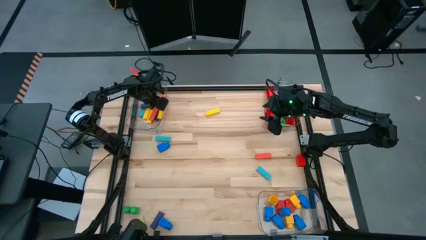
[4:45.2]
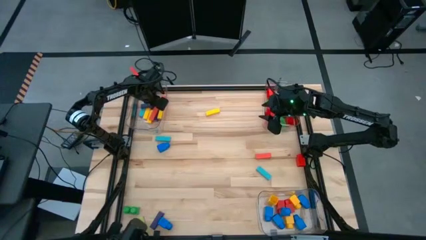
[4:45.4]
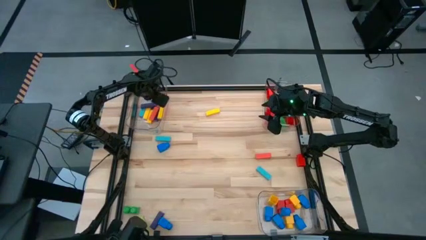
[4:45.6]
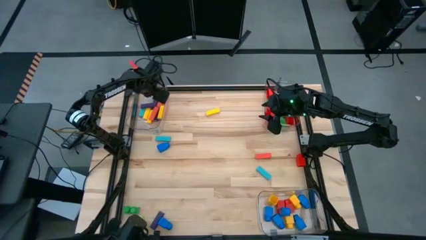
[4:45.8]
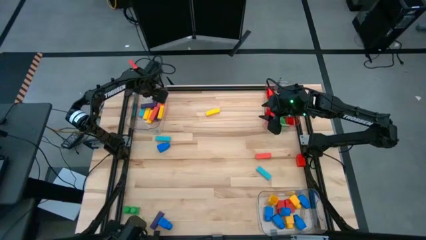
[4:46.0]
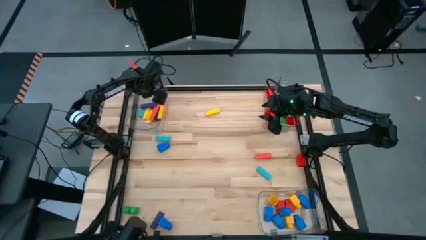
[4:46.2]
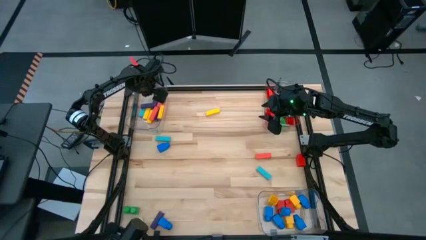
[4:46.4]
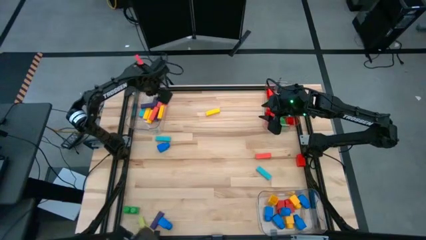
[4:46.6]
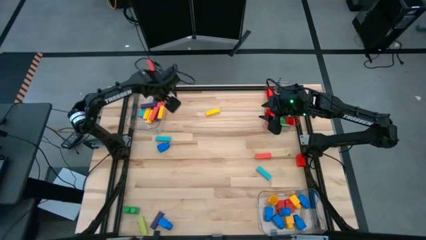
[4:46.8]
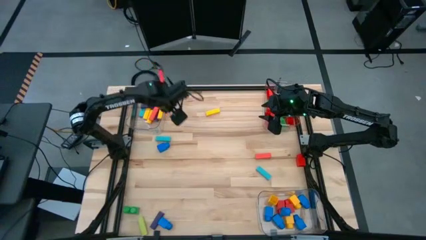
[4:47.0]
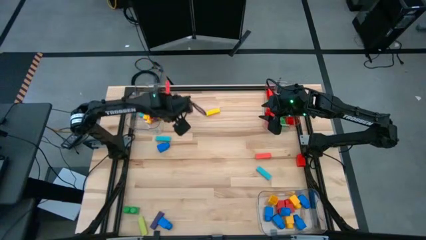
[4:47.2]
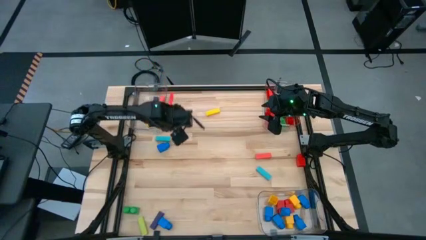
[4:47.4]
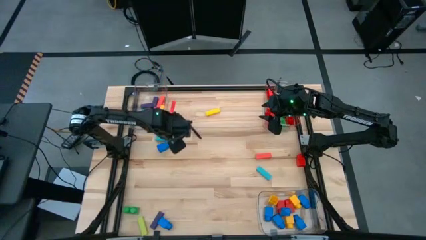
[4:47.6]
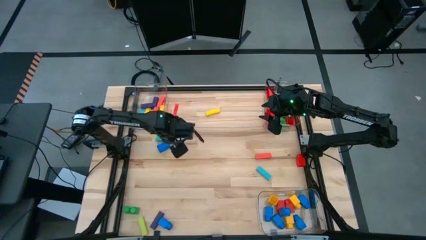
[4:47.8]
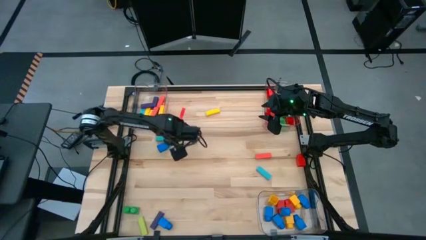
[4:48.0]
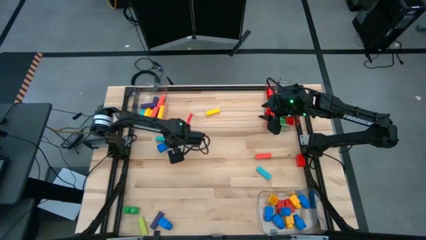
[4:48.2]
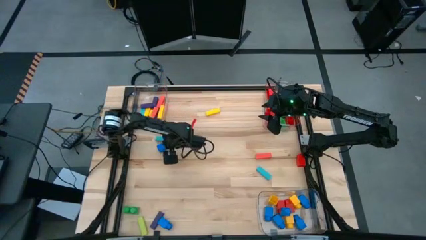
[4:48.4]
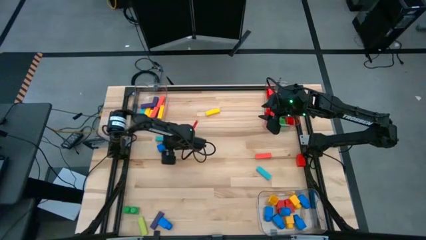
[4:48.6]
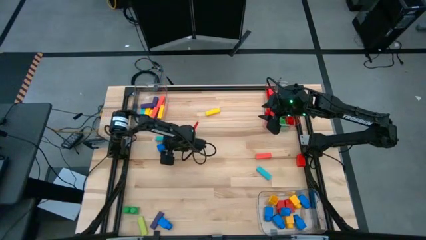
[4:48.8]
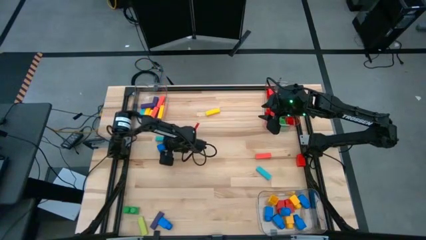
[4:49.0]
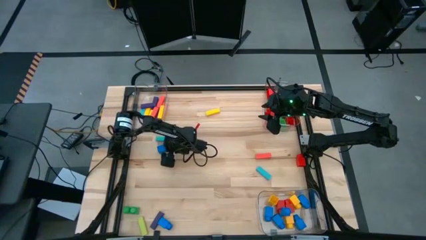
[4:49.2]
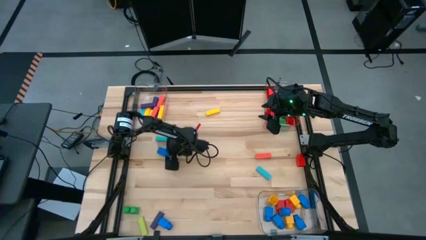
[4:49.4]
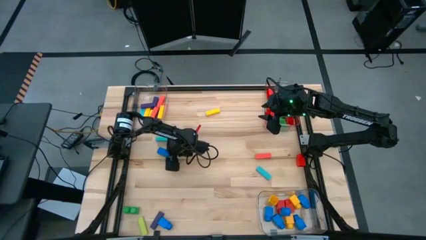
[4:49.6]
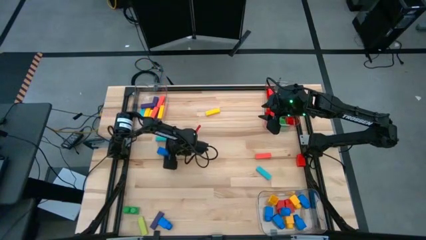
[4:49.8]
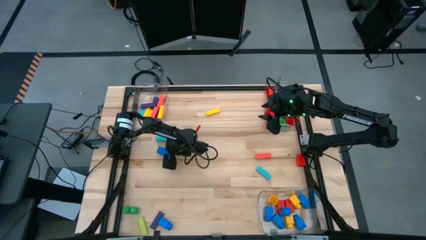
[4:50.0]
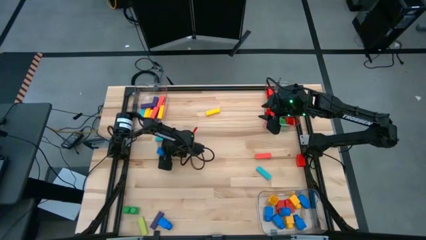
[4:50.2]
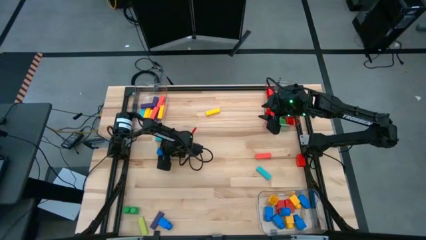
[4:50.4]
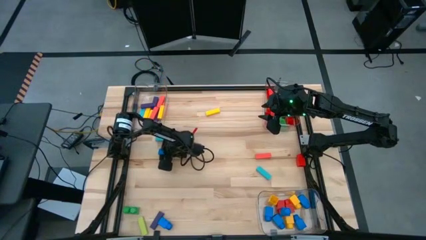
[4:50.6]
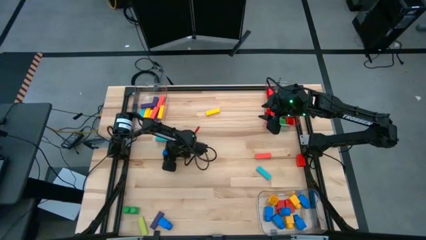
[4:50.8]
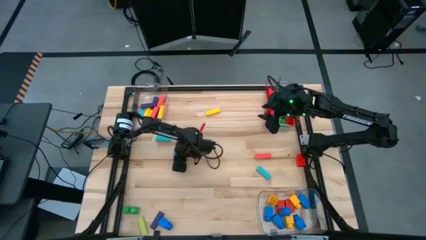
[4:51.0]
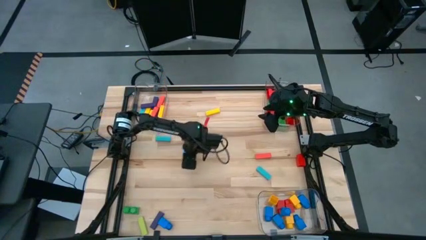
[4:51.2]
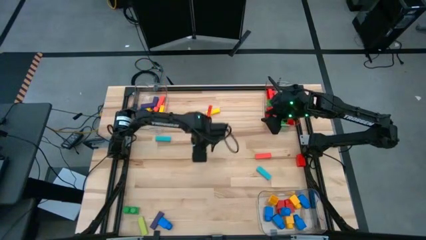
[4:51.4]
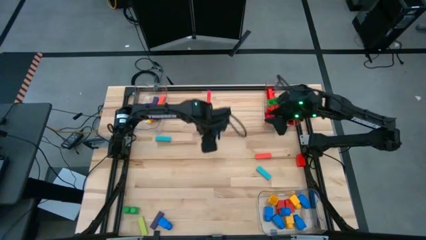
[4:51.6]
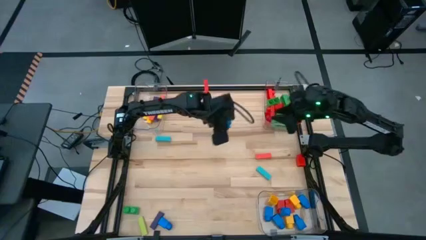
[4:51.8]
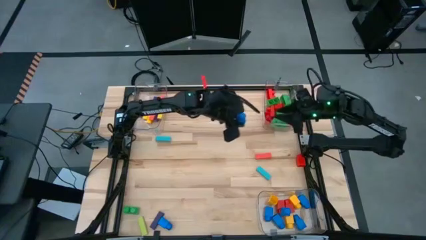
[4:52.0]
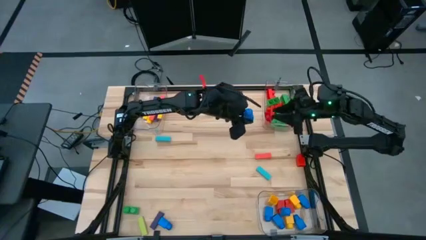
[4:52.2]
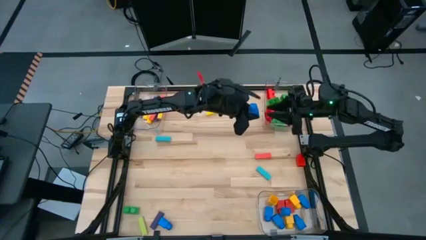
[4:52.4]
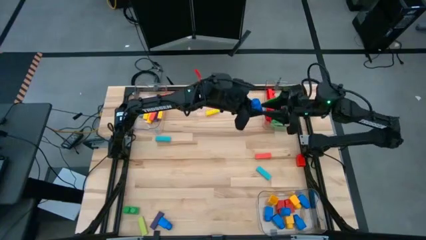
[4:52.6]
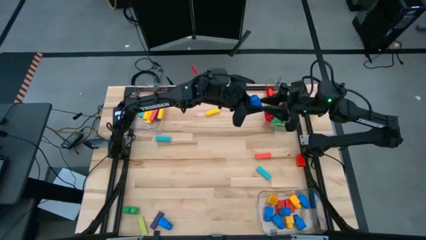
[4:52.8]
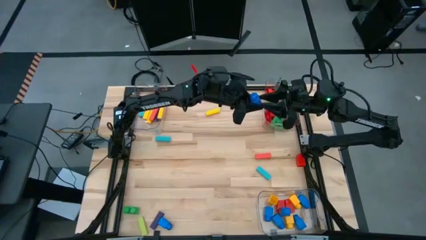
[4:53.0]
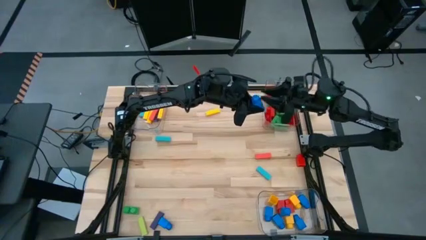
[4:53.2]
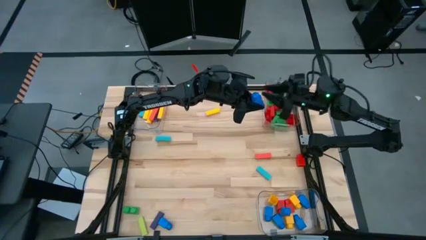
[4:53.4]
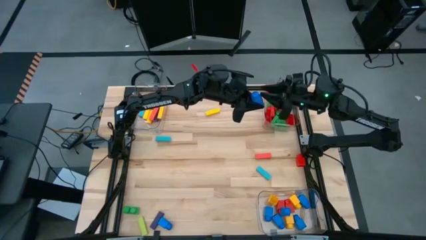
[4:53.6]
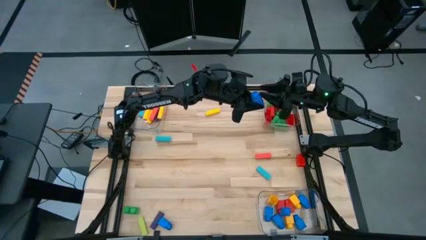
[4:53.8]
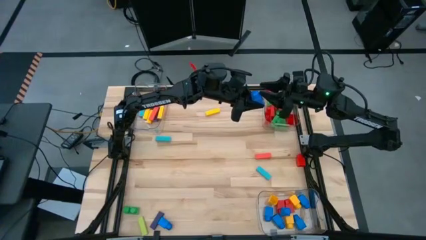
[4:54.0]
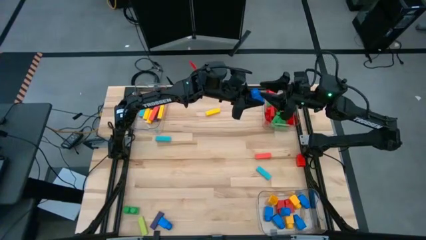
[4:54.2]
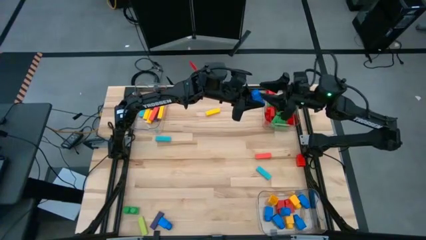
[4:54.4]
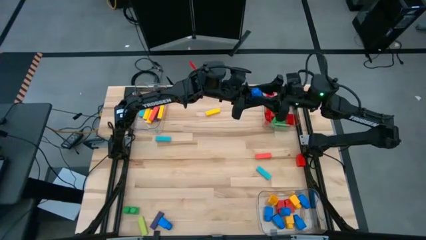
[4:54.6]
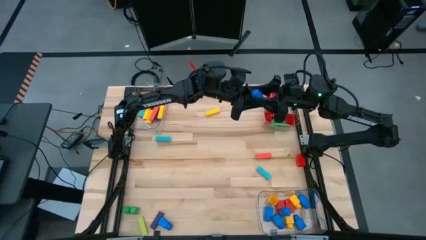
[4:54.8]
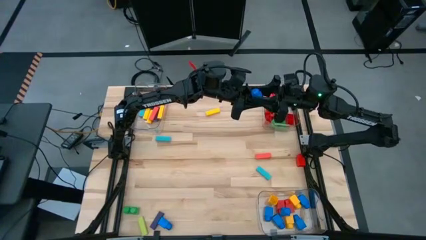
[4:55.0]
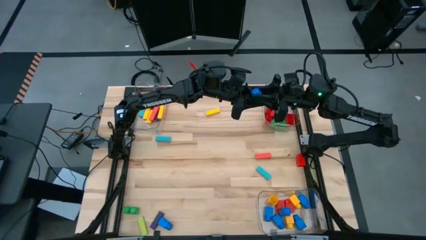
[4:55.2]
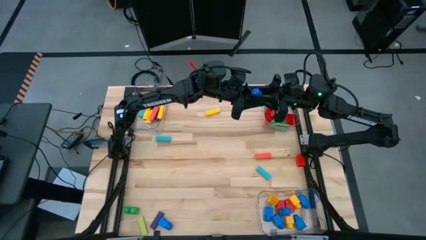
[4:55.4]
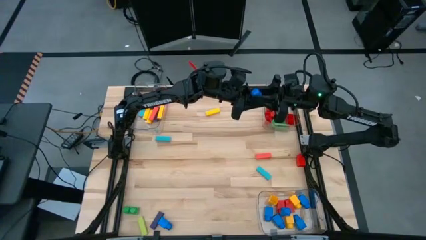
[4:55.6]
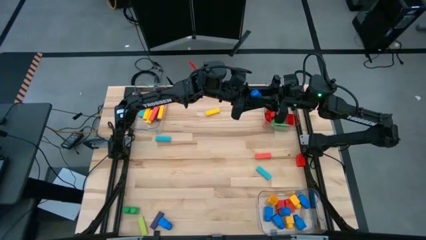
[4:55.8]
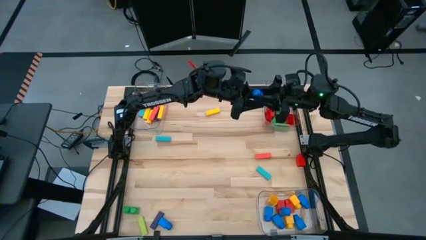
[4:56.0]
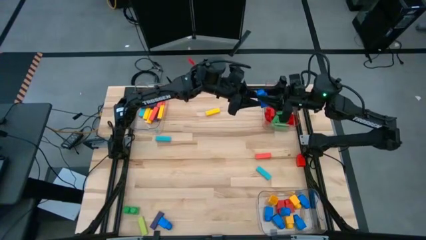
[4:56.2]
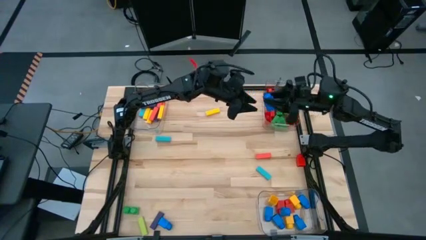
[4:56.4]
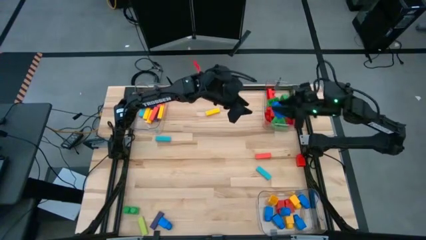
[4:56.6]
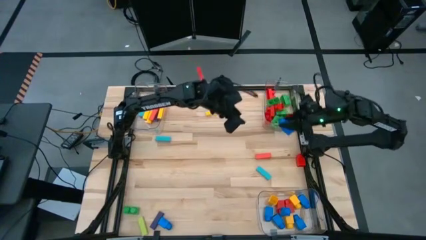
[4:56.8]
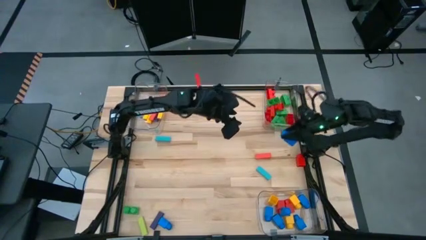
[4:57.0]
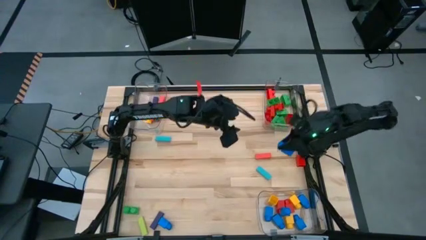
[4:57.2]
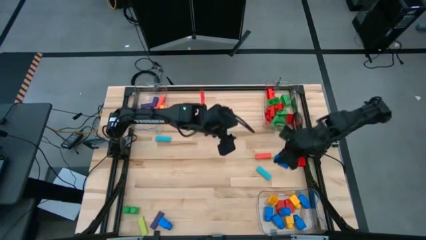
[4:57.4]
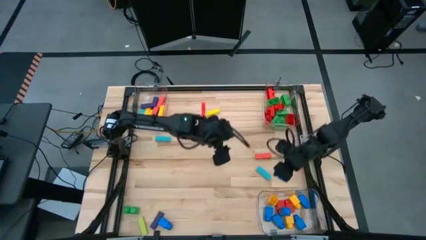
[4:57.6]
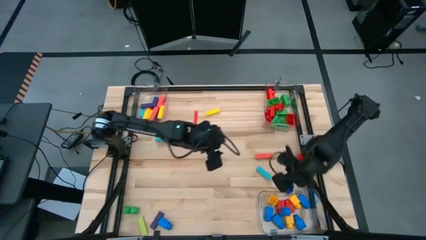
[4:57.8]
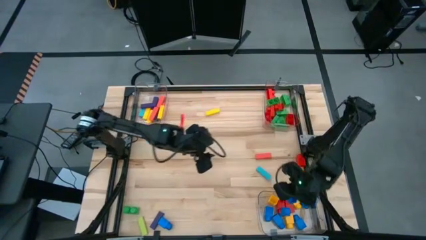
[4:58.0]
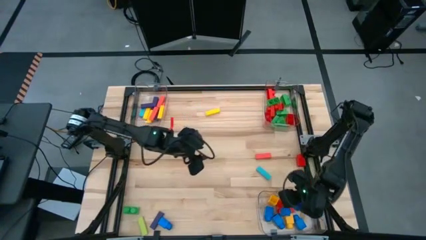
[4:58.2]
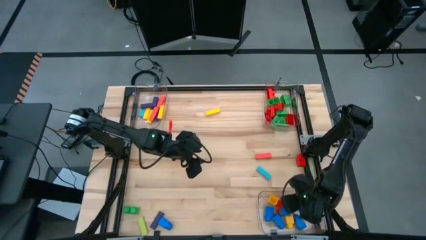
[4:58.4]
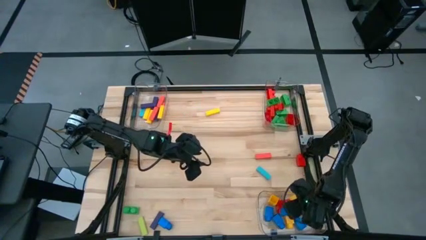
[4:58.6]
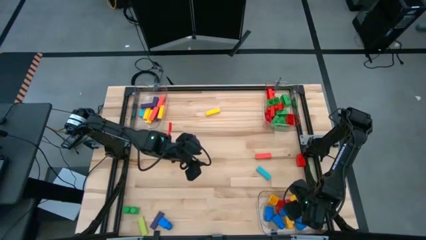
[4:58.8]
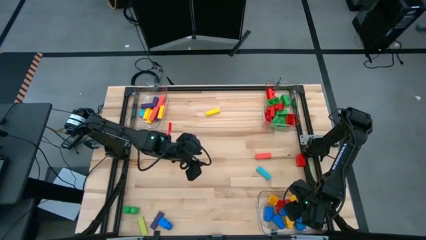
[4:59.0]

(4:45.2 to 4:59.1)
Task: Sort blocks by size
Put the blue 1 stud game piece into the bottom transparent bin
